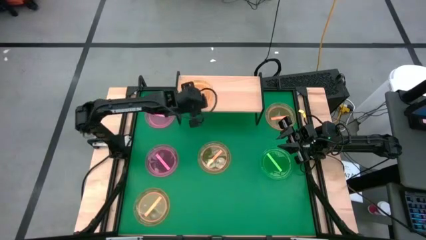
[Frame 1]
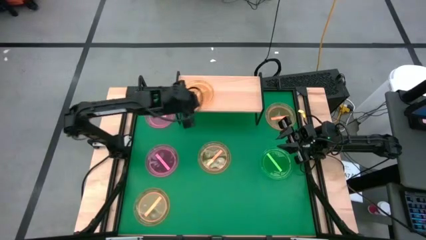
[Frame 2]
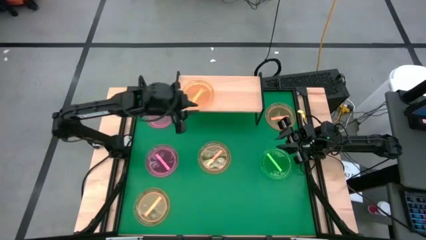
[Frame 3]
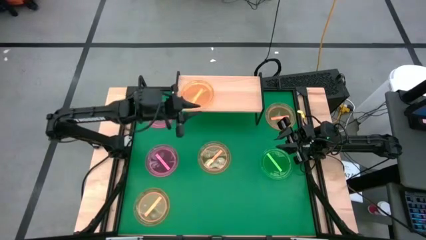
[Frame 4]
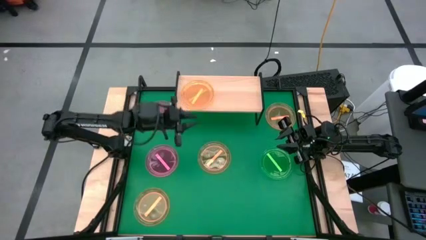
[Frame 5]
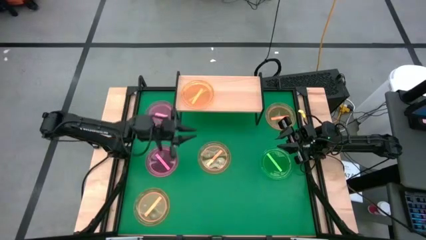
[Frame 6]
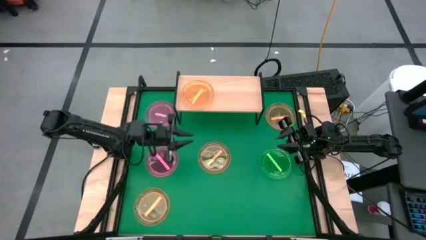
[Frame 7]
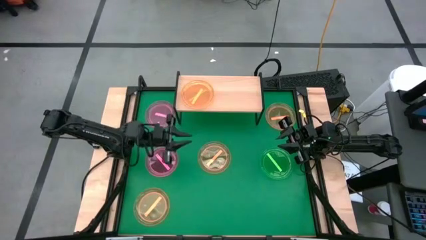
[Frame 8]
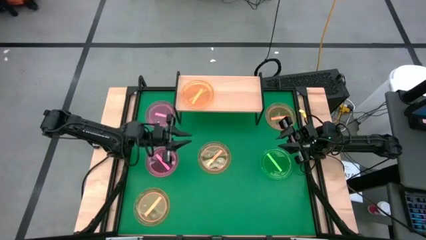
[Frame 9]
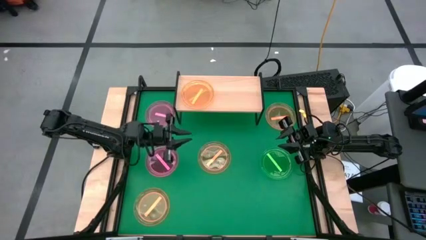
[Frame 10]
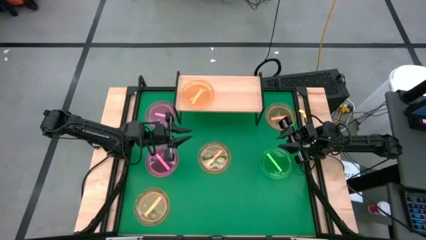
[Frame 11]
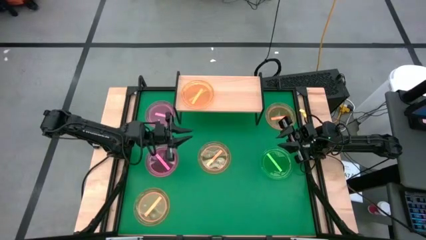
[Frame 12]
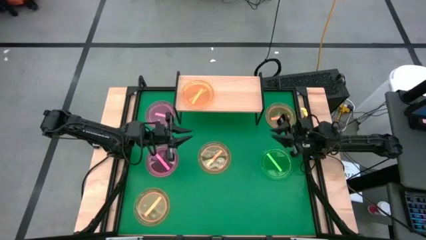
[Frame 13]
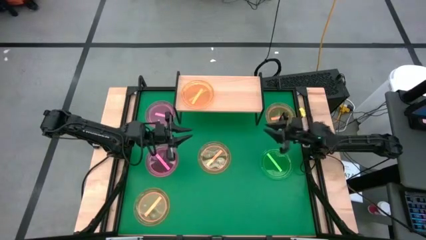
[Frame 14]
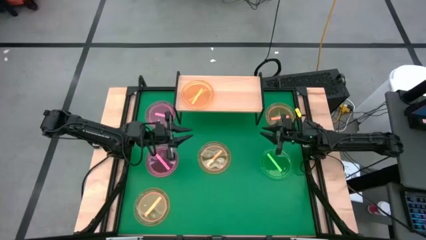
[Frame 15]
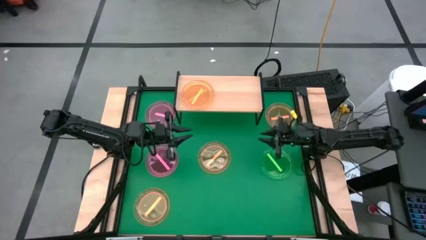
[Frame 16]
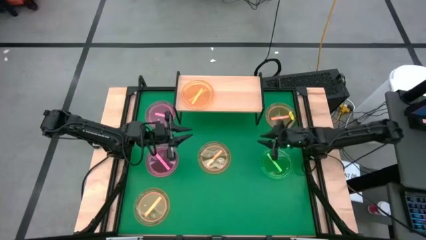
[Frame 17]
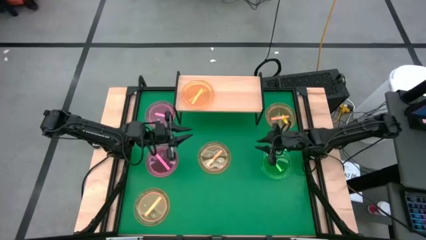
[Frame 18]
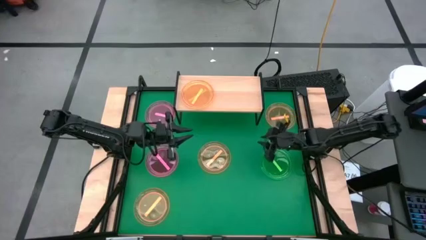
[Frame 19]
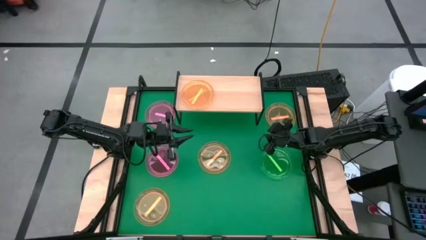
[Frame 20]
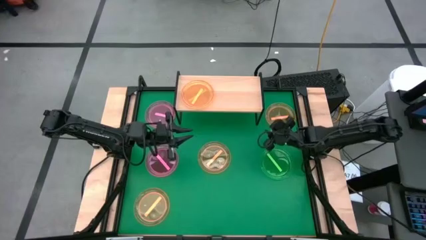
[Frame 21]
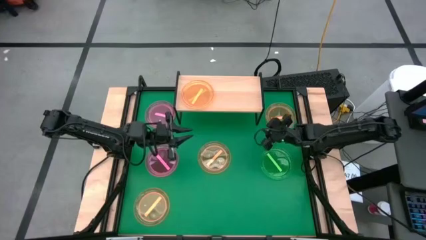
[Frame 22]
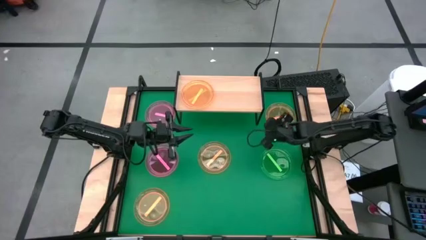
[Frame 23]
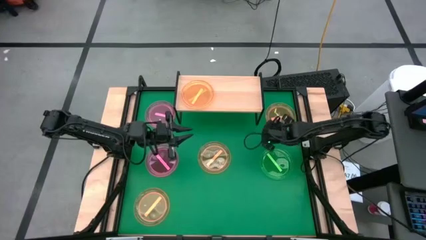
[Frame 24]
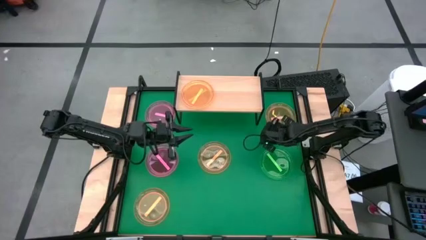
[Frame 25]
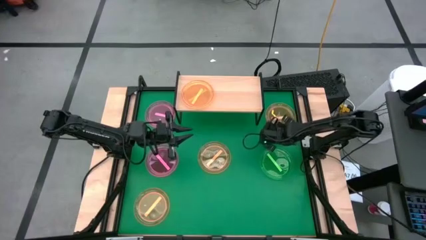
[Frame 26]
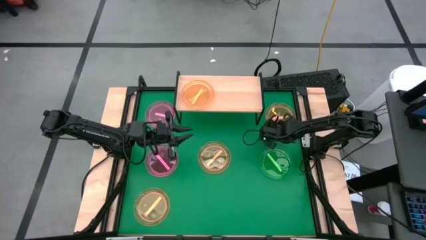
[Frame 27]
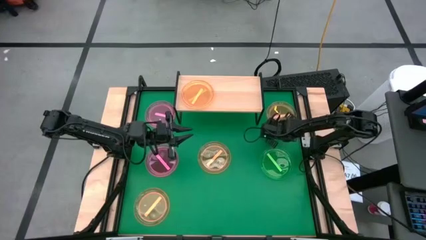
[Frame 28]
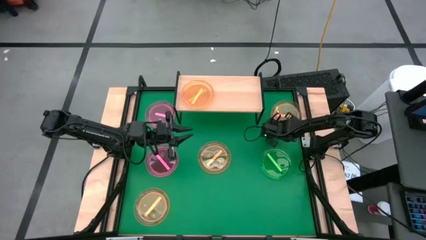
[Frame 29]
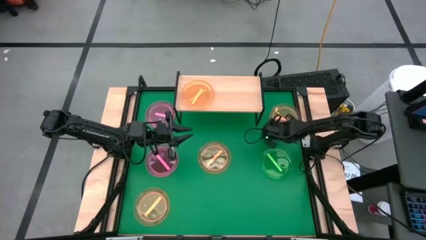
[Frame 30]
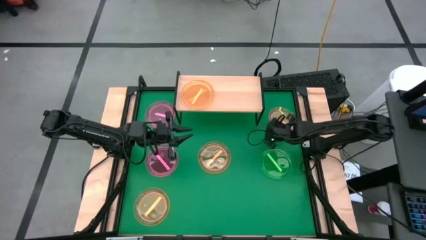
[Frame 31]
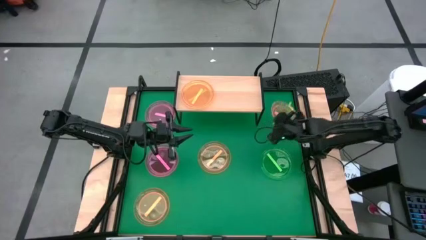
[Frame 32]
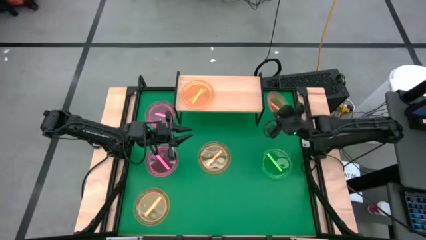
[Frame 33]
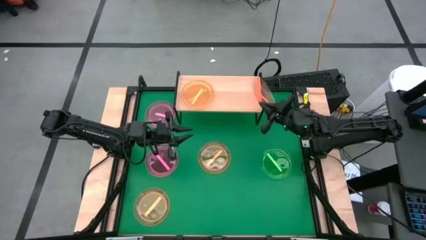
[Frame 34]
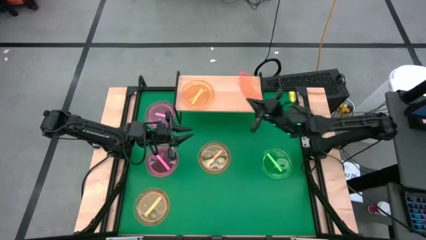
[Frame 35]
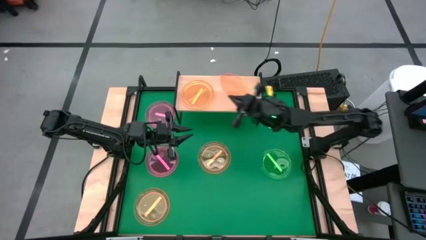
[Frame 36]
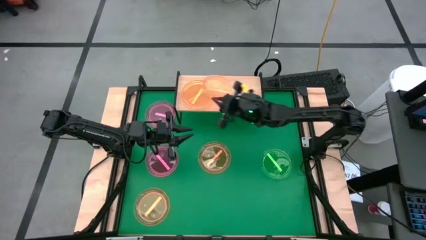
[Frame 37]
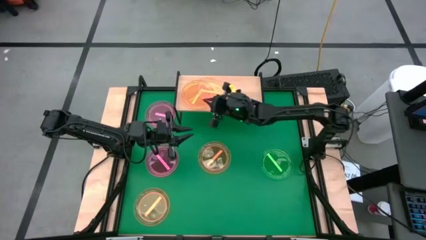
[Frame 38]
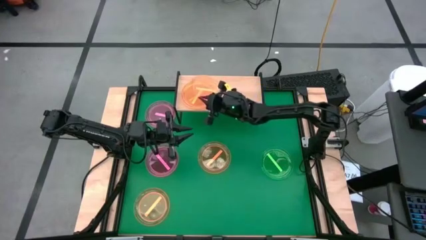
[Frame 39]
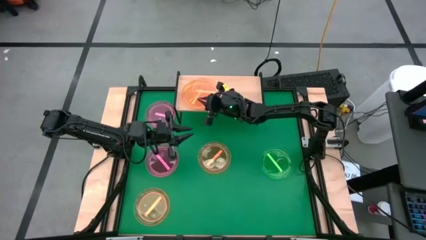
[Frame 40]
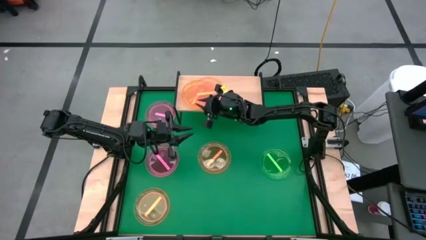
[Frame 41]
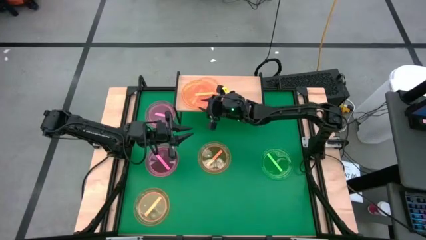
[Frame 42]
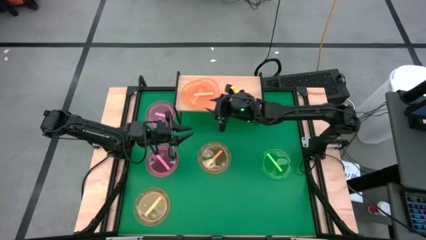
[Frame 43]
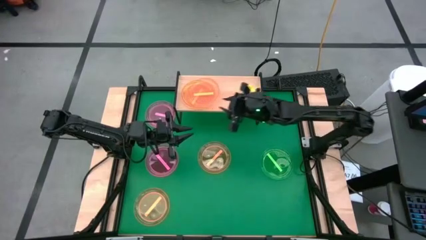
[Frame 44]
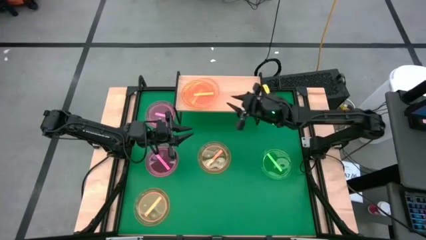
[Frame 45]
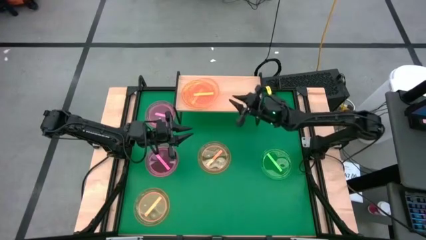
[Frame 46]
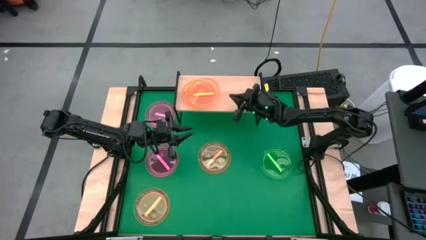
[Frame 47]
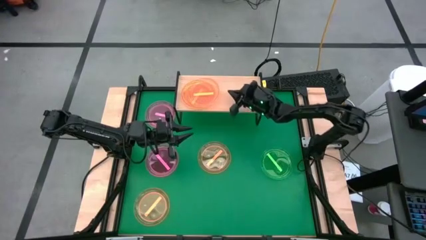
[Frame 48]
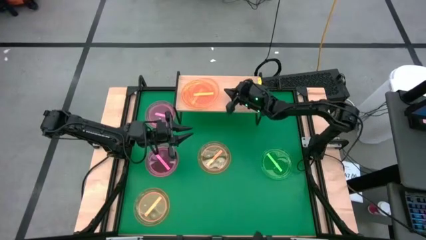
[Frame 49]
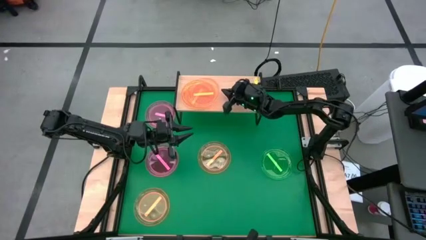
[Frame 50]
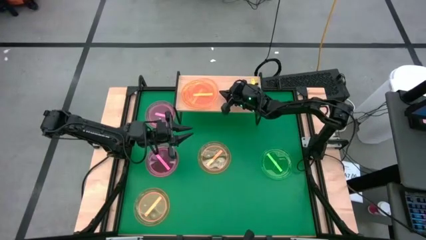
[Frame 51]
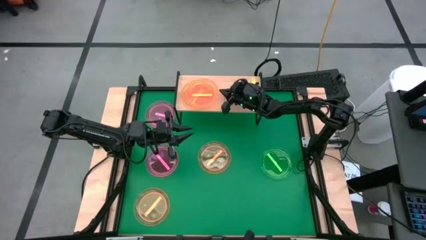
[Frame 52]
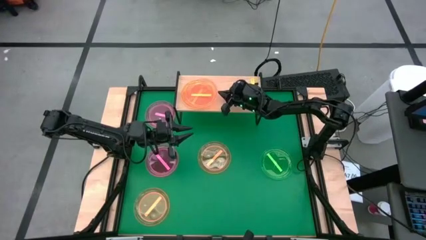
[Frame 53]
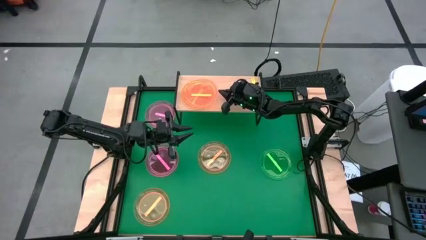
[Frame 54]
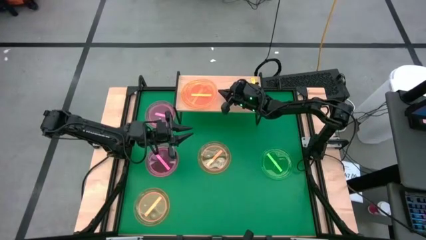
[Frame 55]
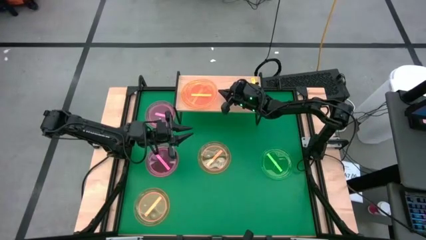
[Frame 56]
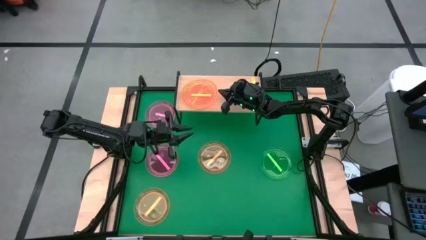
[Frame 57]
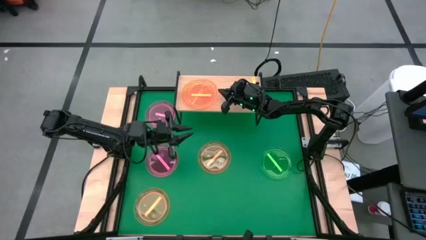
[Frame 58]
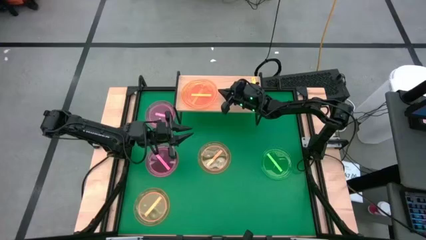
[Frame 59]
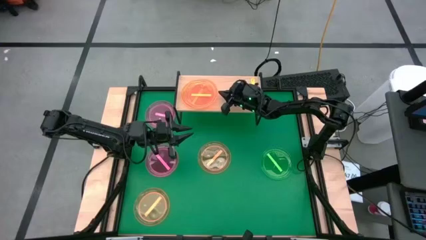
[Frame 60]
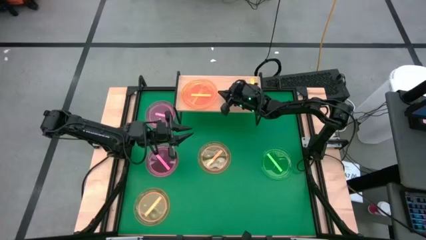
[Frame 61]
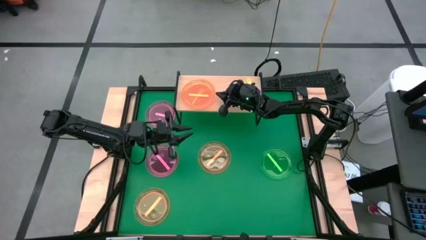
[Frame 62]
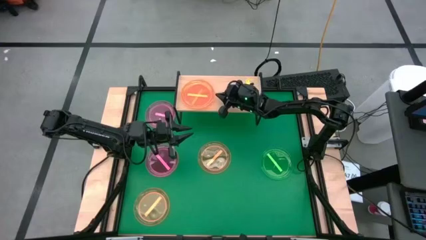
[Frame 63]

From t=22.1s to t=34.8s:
Task: Place and stack plates onto a shelf
Stack the top orange plate on the orange plate on the shelf

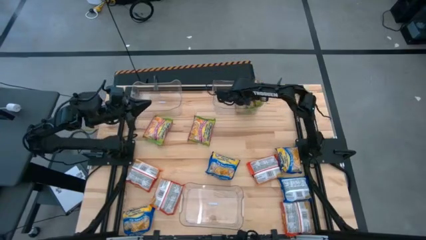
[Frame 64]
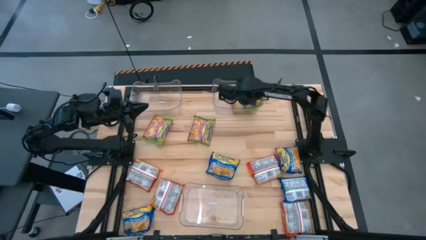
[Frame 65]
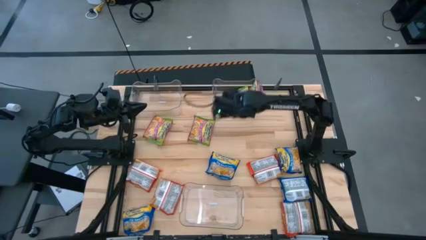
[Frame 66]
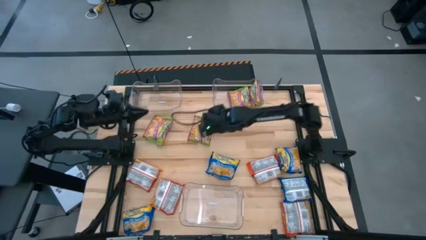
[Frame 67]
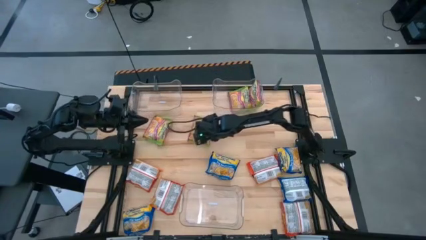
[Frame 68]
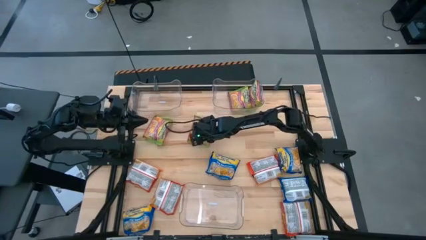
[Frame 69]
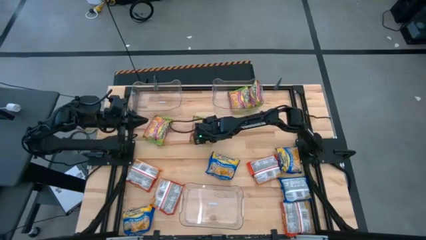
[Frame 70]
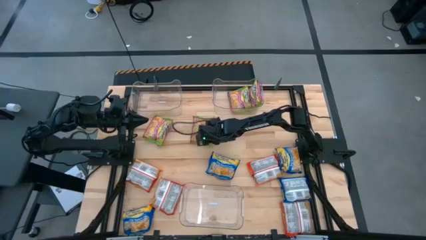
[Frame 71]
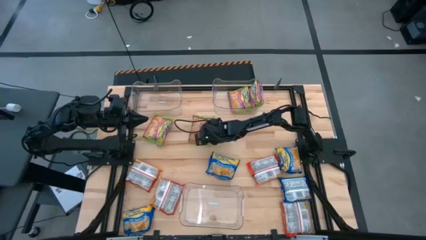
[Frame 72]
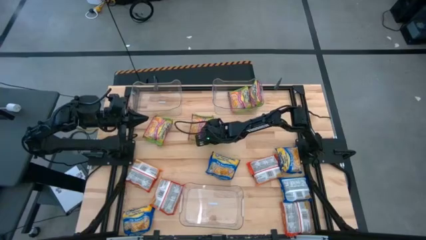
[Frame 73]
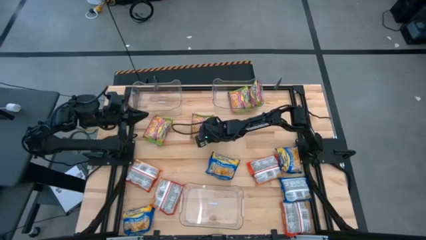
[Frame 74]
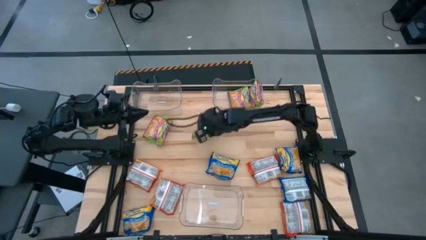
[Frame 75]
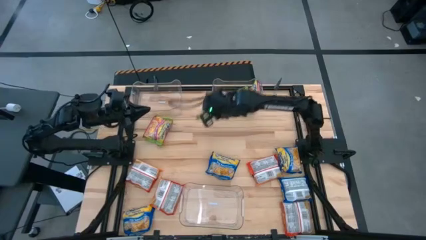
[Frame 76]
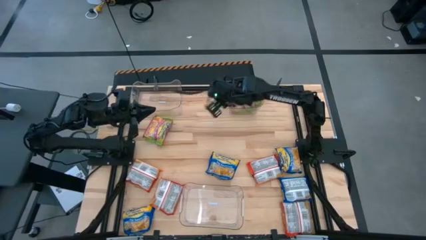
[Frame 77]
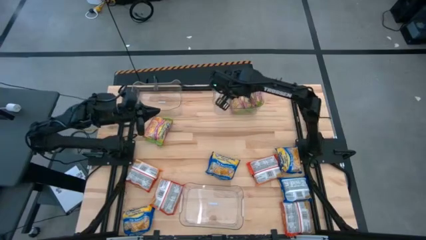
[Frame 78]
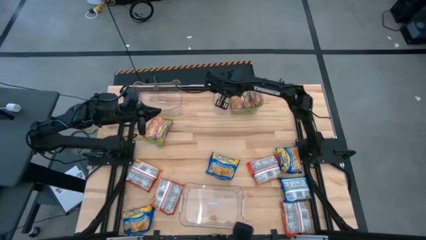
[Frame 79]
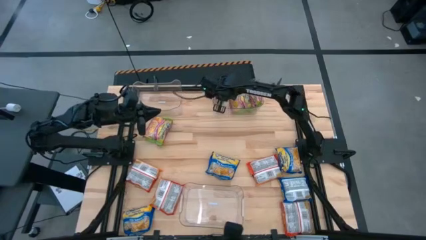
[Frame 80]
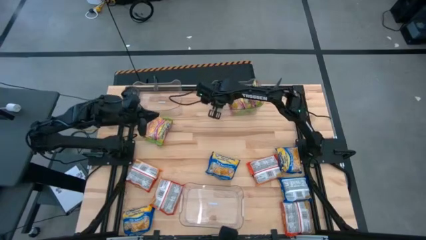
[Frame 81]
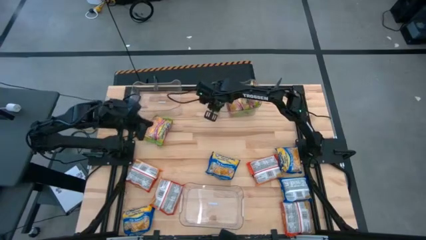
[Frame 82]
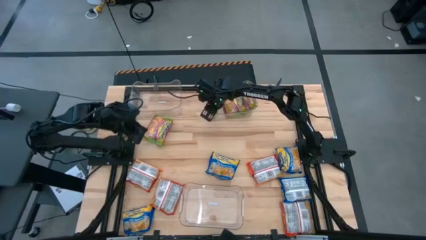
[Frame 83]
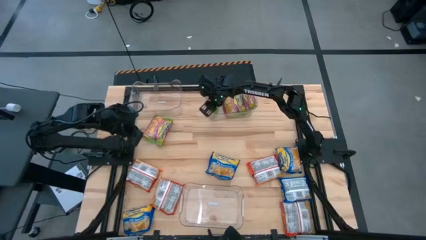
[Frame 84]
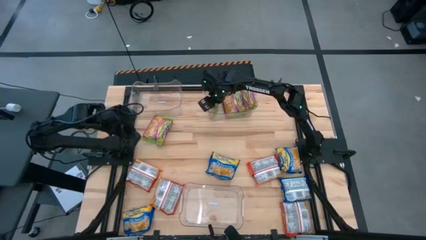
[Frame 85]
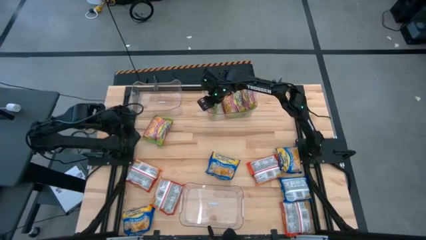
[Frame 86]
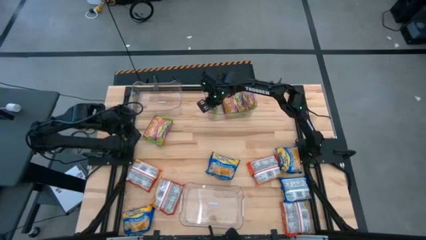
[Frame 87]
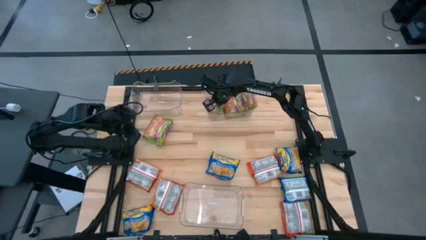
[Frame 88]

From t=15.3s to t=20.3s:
Task: Sort Maruchan noodles
Put the green noodle pack into the top right transparent bin
